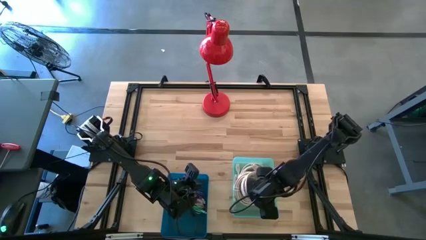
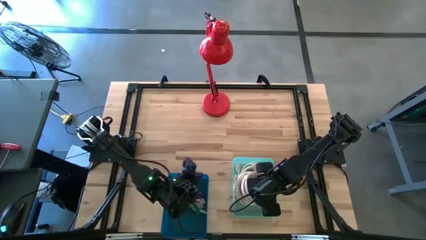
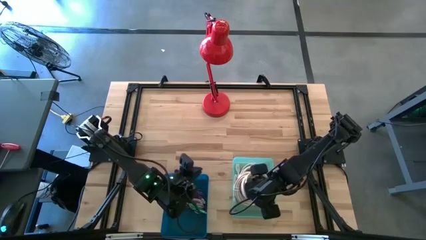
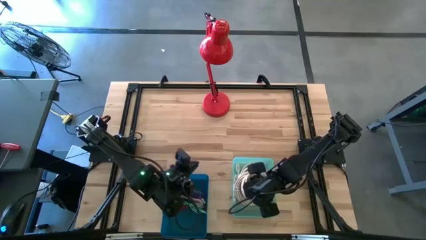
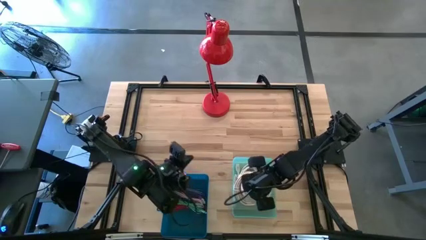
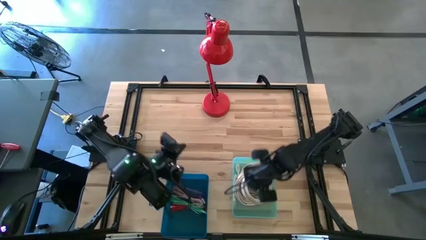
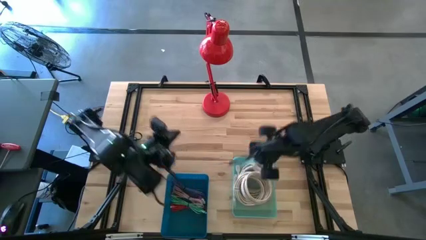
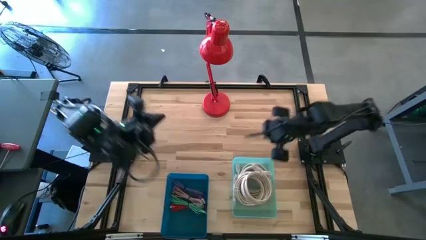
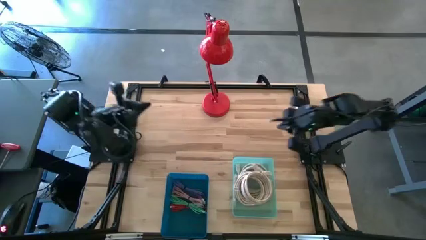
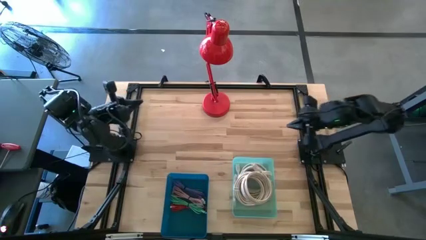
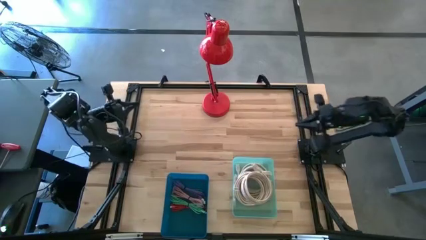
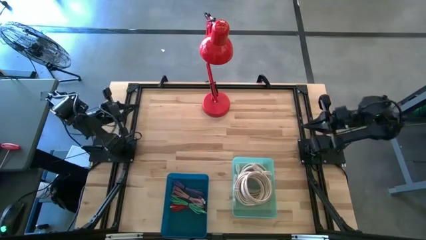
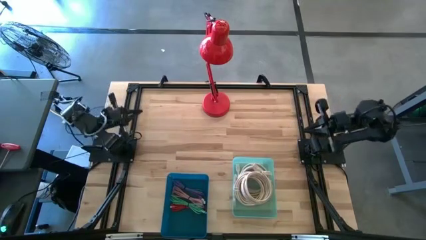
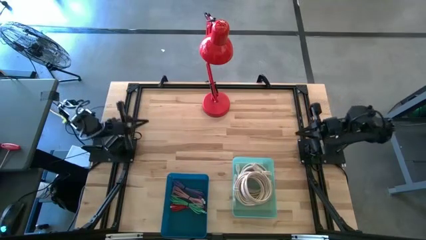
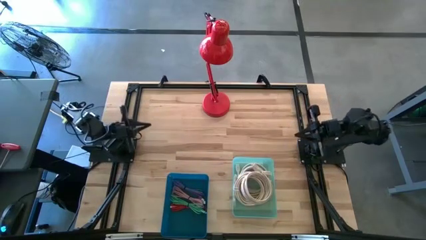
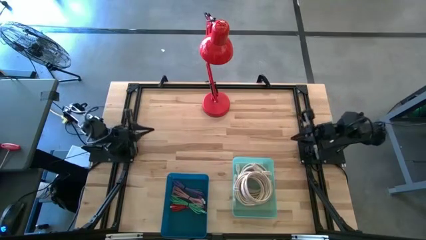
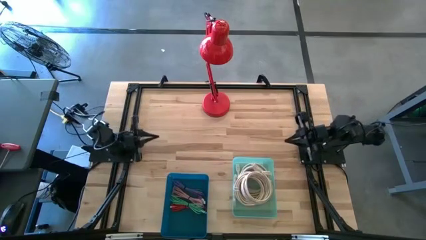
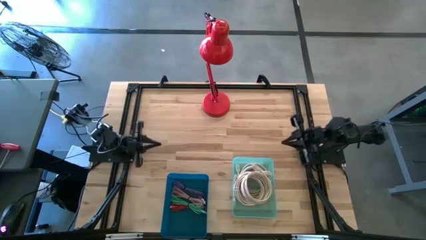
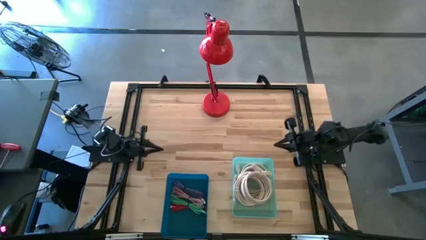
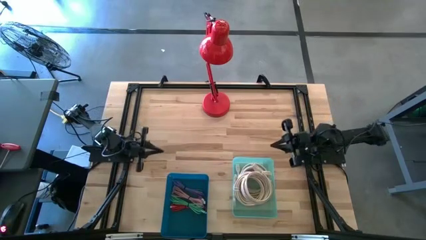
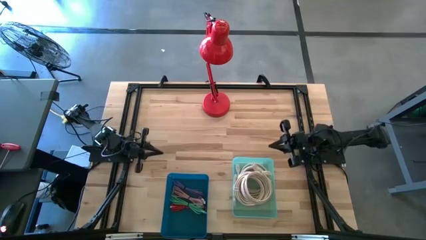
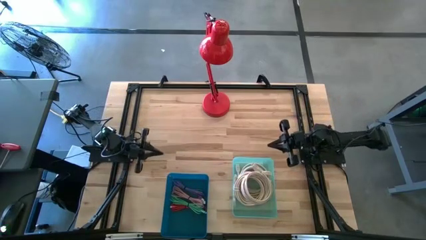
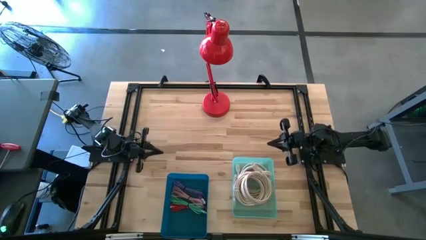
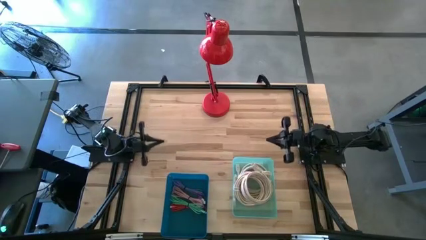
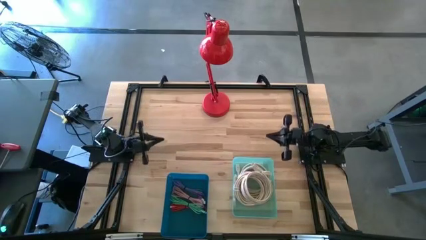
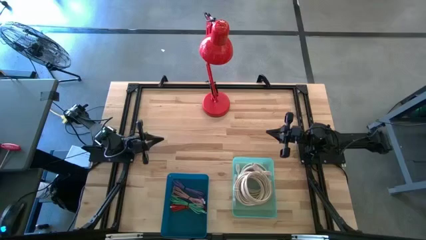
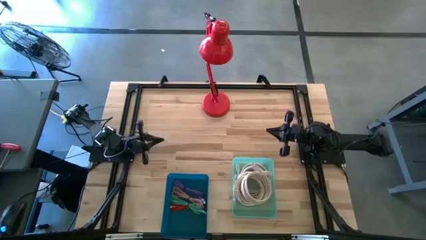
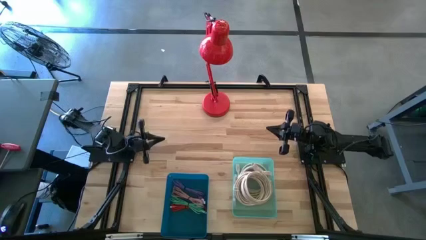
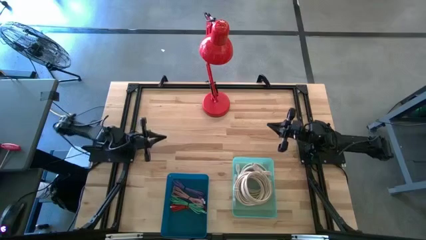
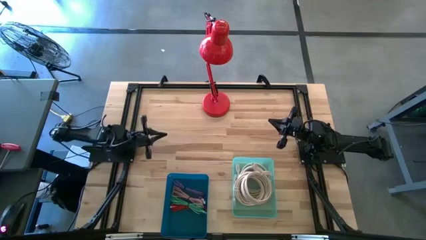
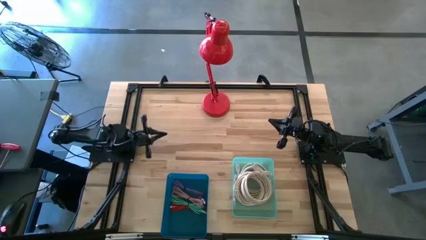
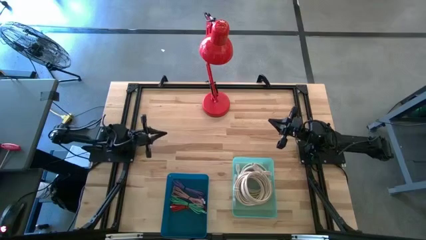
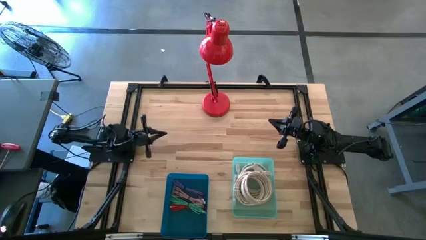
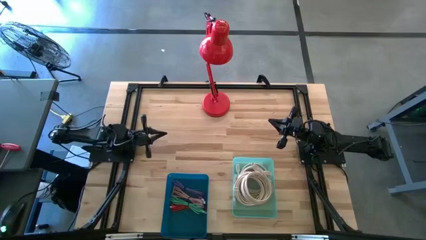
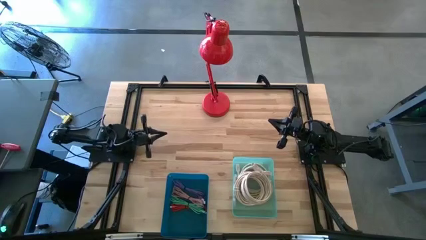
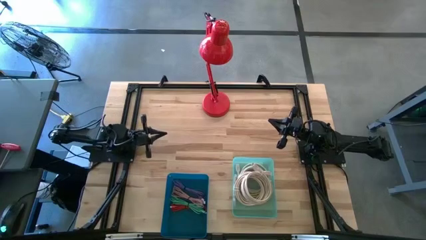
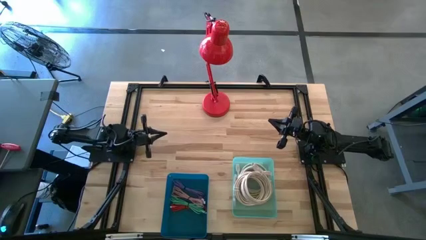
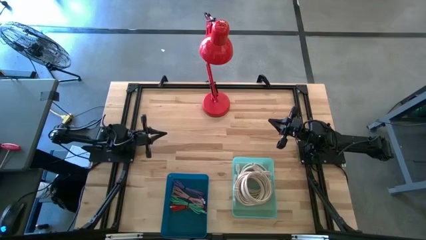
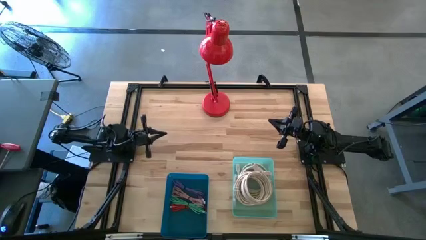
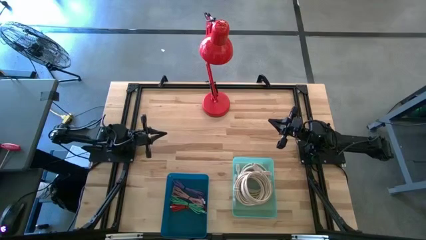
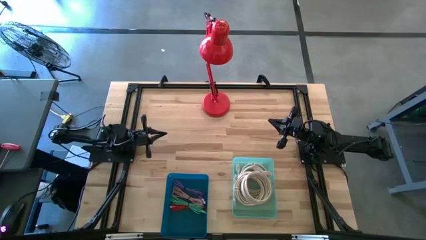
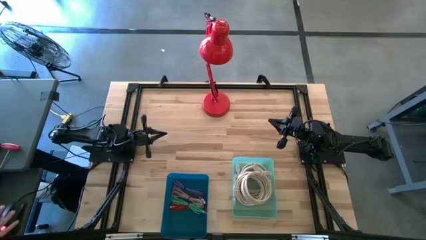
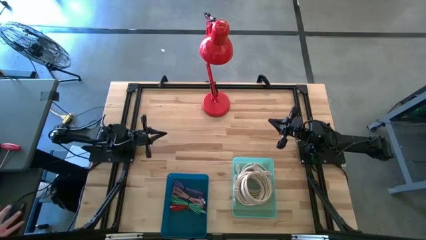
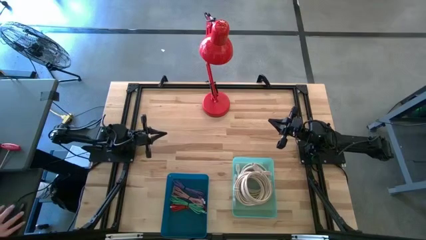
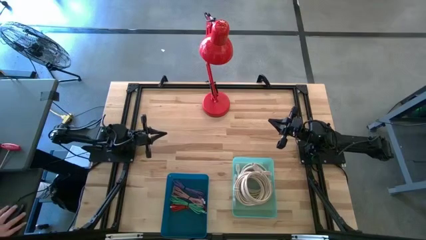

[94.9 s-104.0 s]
Task: Pick & Place USB Port
Return to Home Position
